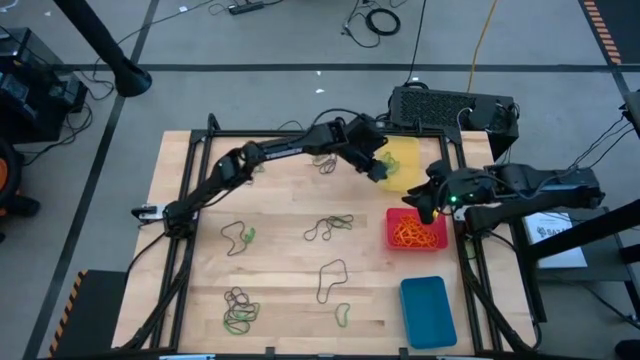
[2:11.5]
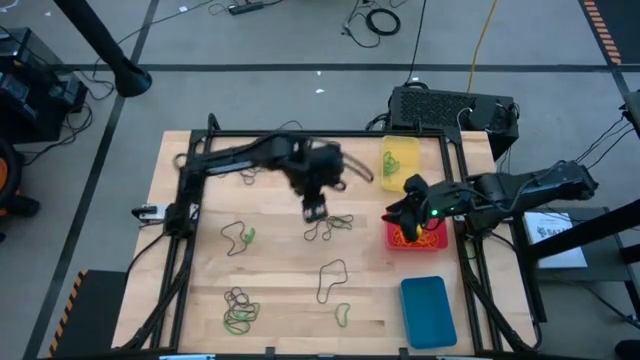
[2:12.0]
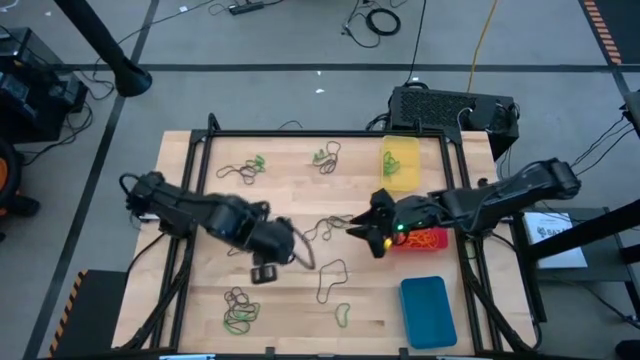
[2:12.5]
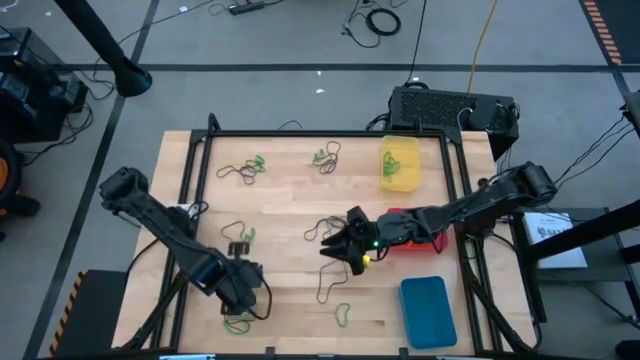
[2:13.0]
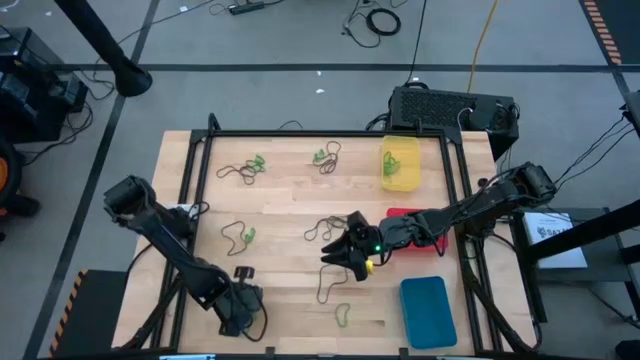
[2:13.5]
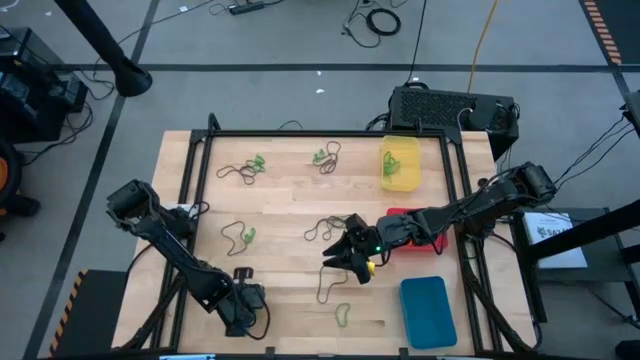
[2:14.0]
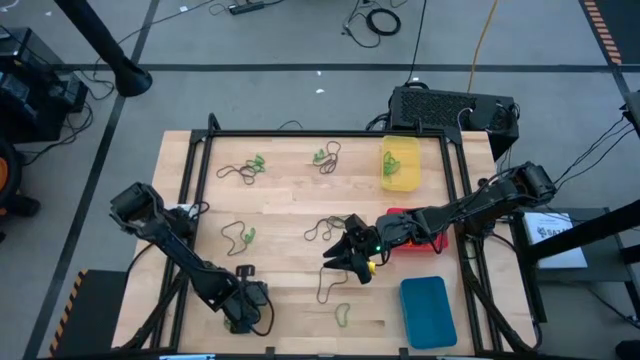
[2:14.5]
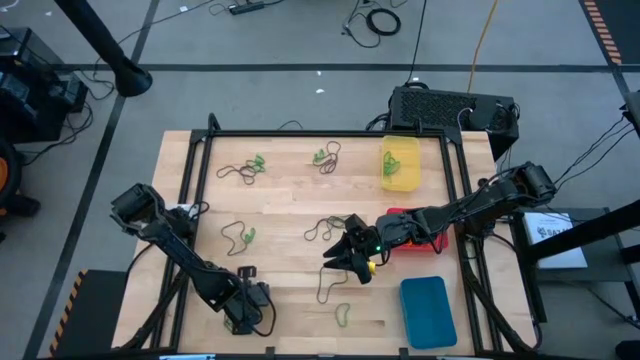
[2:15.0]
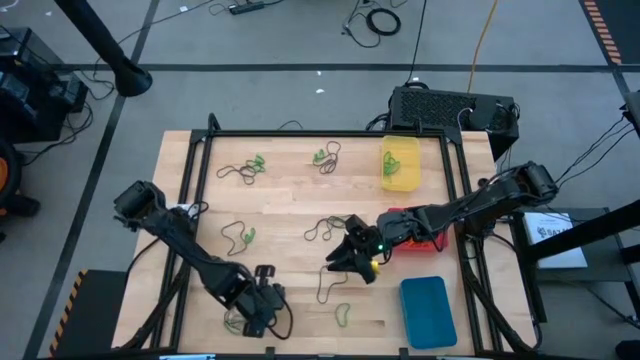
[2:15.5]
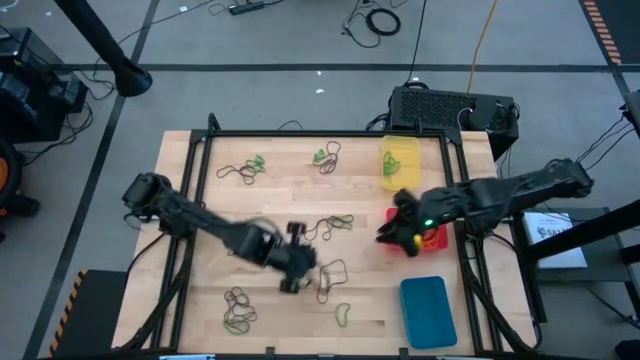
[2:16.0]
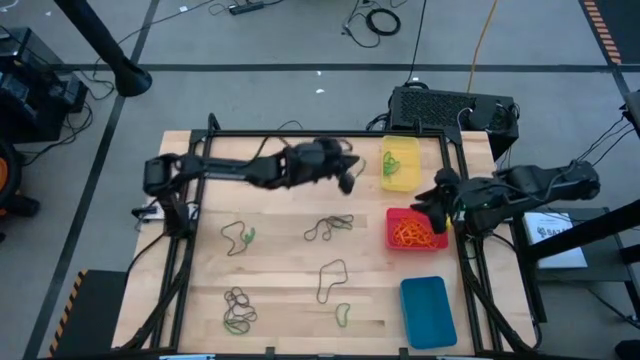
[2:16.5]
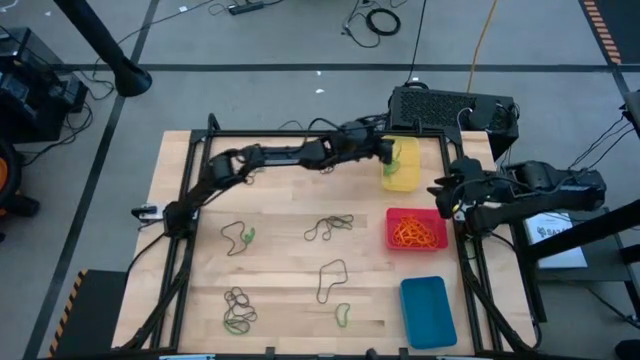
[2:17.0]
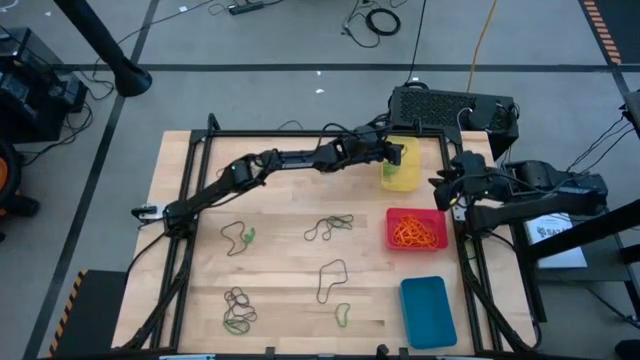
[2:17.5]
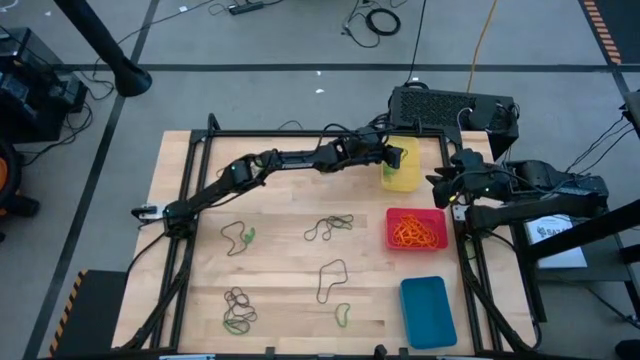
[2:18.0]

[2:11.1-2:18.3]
Task: Sort rubber bands into baskets
Put the green rubber band into the yellow bin

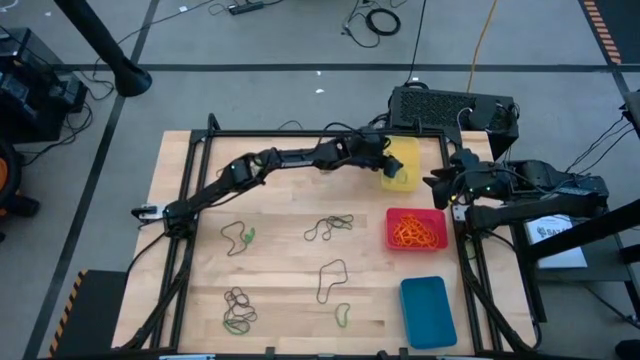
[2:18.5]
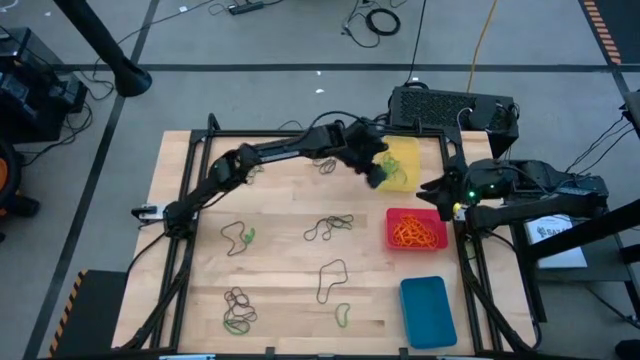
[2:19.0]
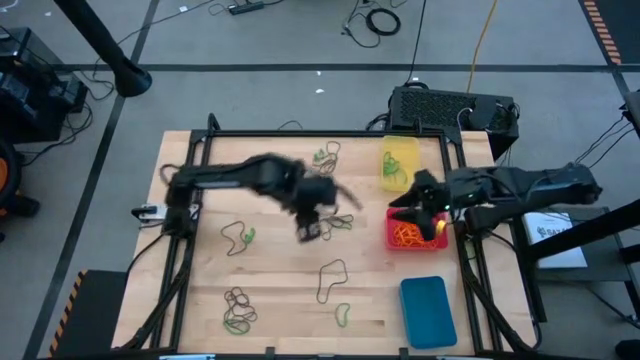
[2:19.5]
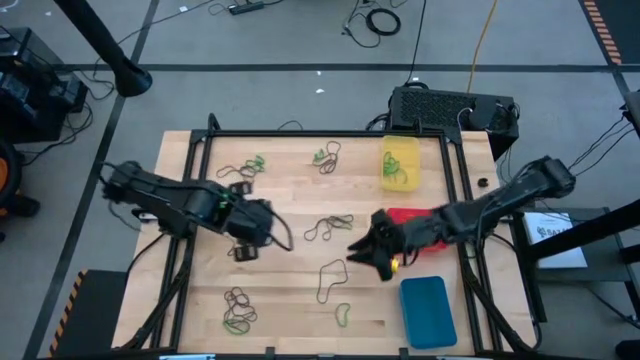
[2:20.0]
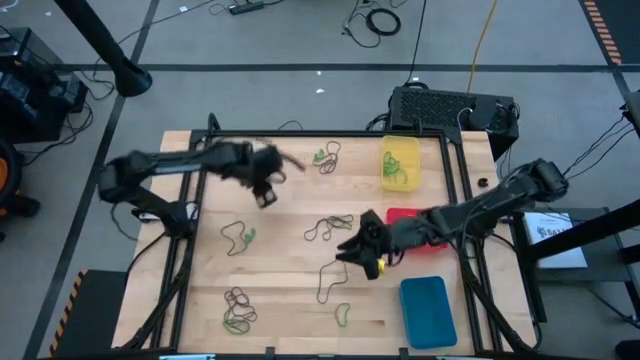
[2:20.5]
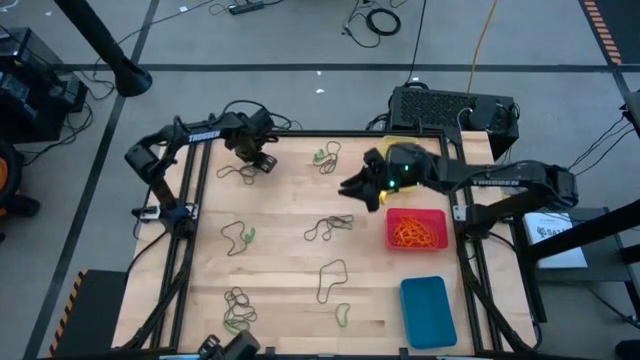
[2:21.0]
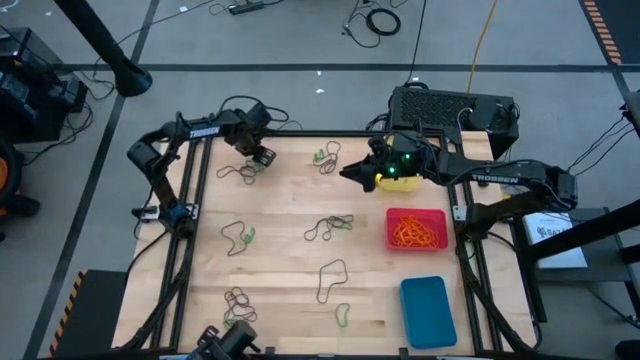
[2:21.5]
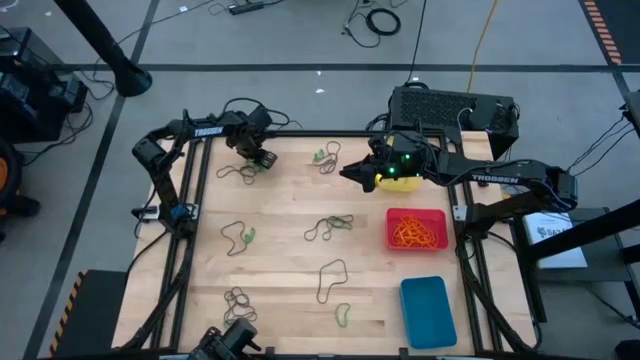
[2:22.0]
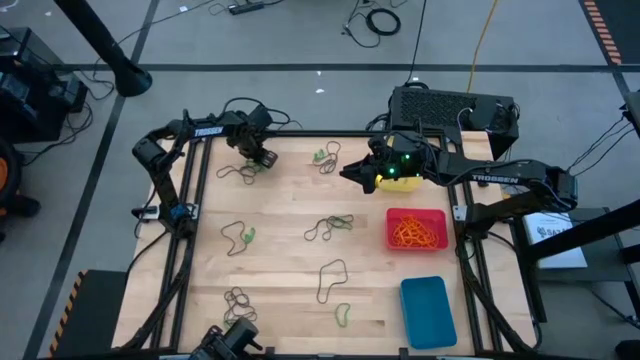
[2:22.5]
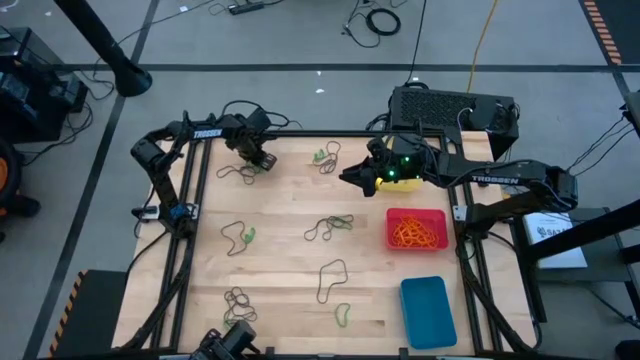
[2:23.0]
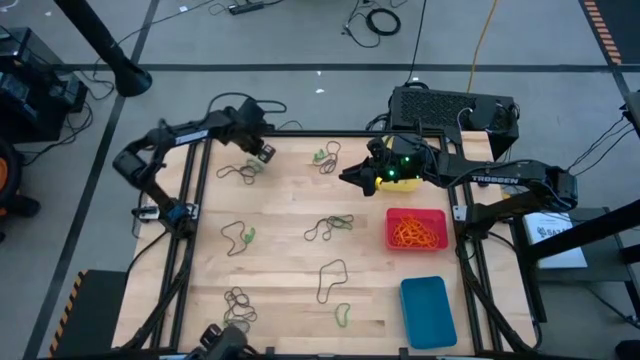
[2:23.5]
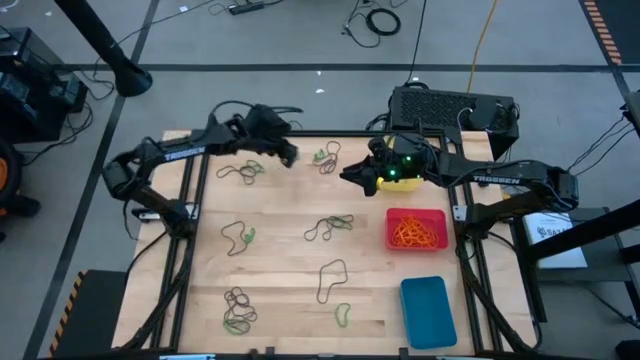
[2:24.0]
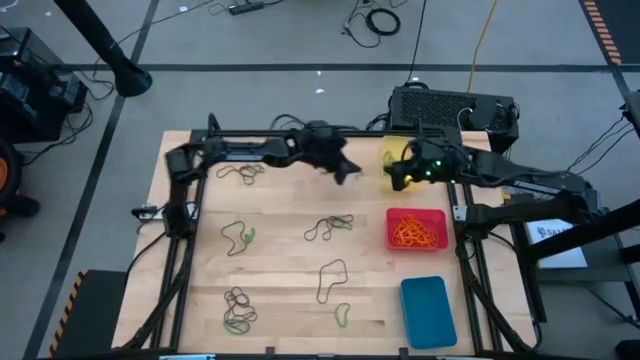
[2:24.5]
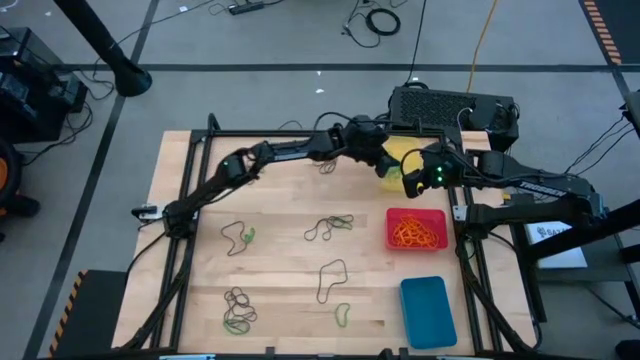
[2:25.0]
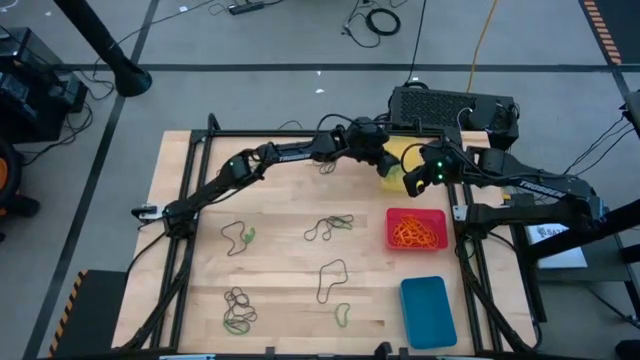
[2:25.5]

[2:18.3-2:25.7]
Put the green rubber band into the yellow bin

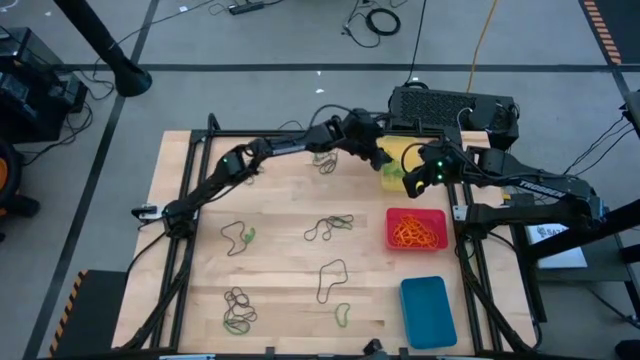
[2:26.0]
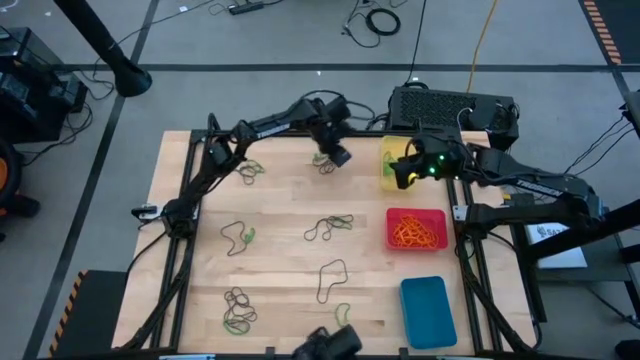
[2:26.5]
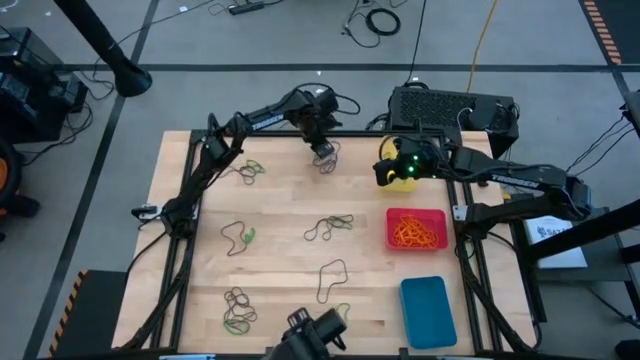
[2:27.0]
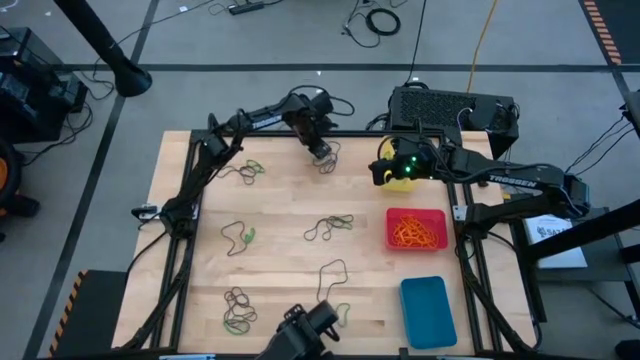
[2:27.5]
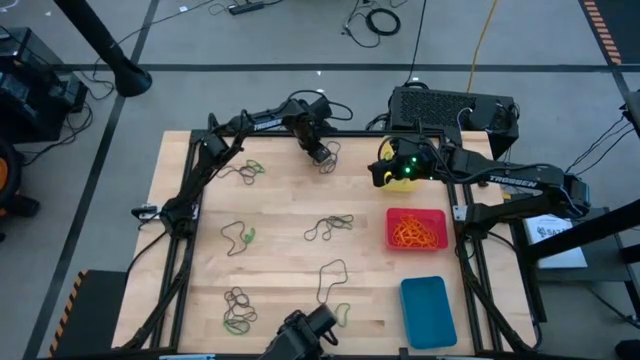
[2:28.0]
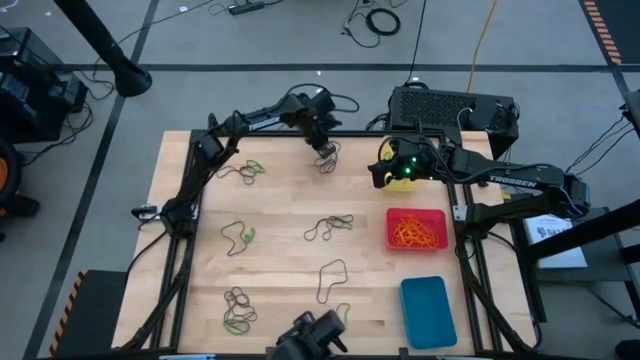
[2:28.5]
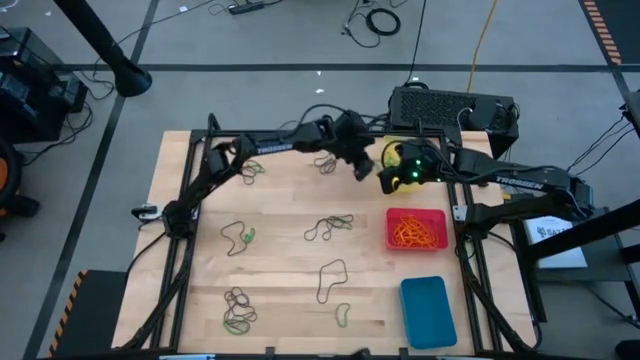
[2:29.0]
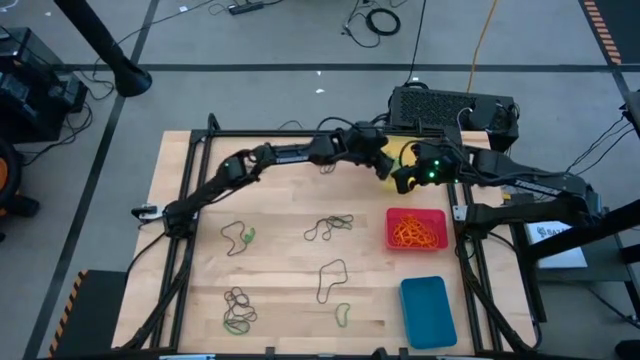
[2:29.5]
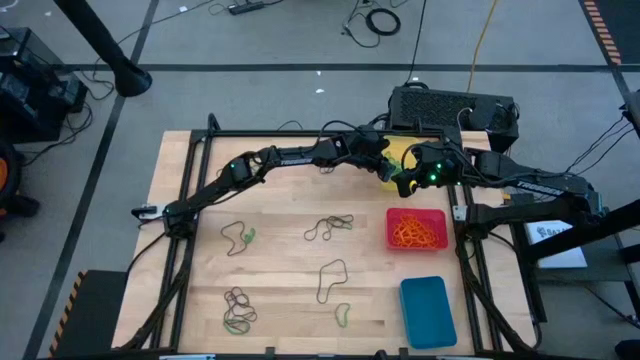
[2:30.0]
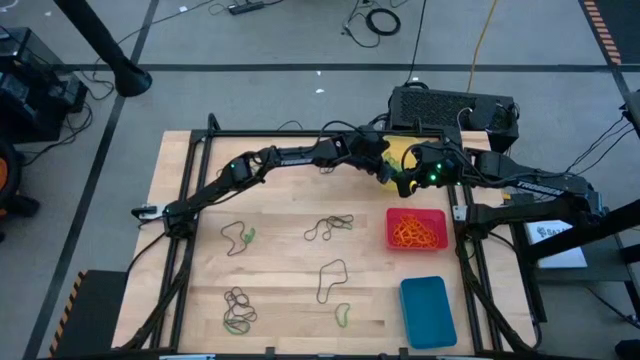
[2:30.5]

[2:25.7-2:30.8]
Put the green rubber band into the yellow bin
